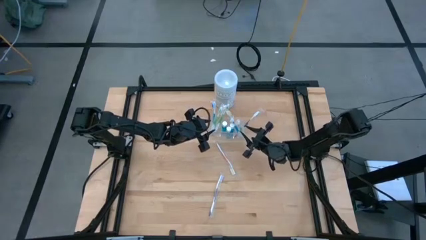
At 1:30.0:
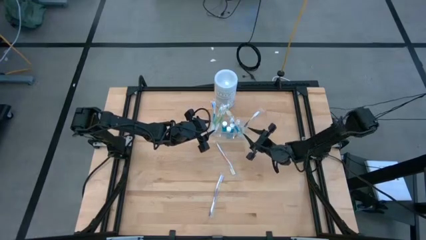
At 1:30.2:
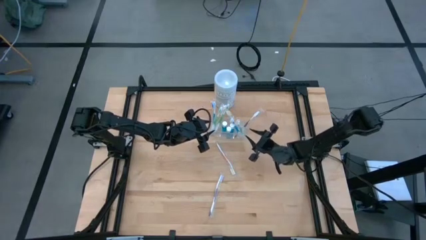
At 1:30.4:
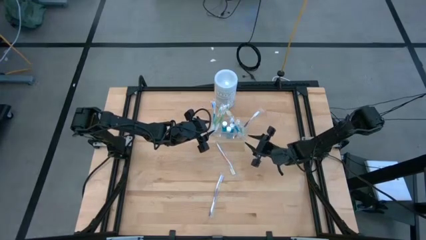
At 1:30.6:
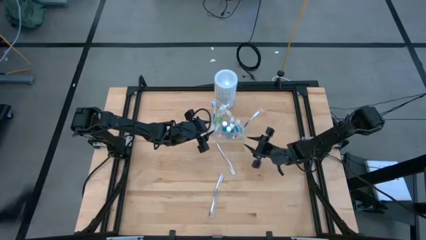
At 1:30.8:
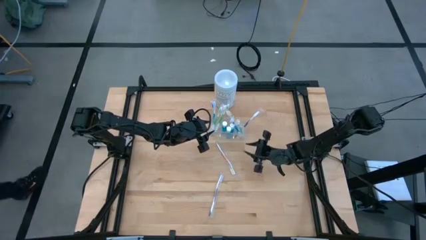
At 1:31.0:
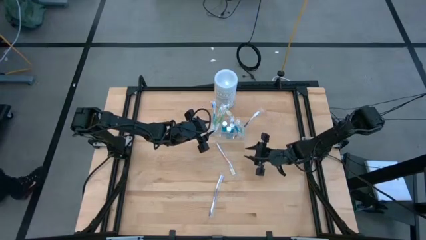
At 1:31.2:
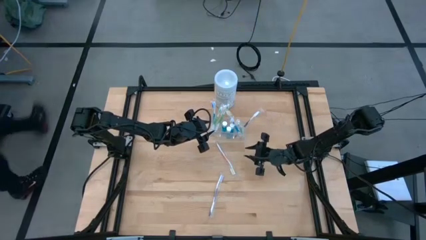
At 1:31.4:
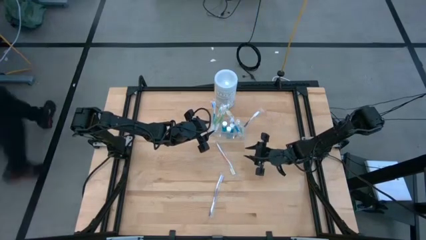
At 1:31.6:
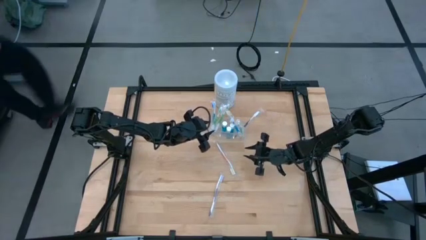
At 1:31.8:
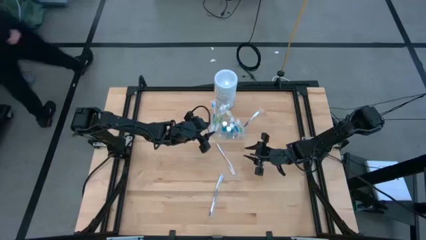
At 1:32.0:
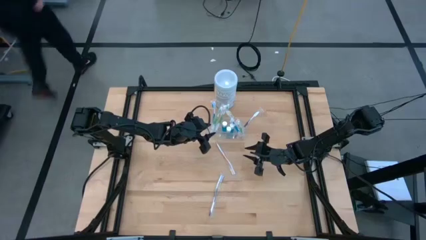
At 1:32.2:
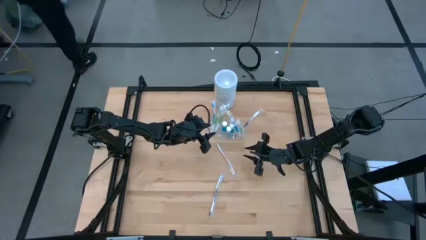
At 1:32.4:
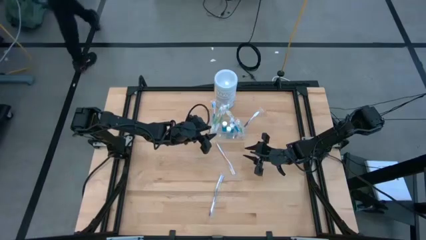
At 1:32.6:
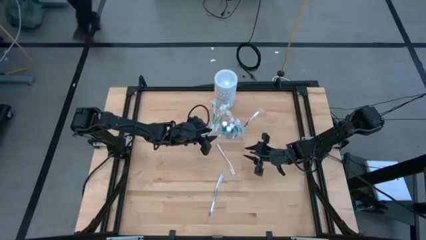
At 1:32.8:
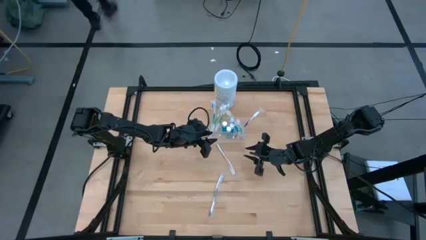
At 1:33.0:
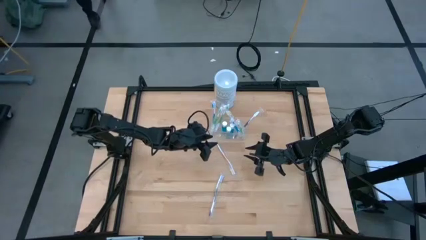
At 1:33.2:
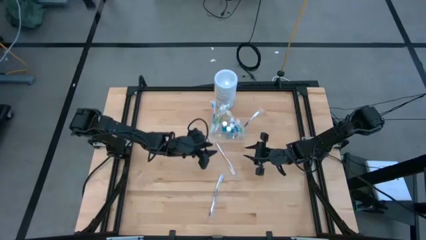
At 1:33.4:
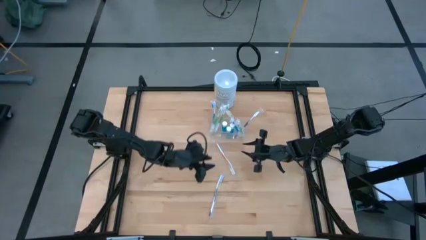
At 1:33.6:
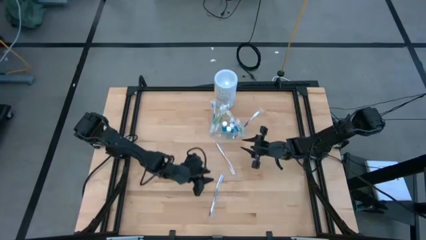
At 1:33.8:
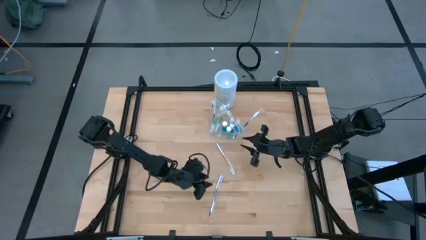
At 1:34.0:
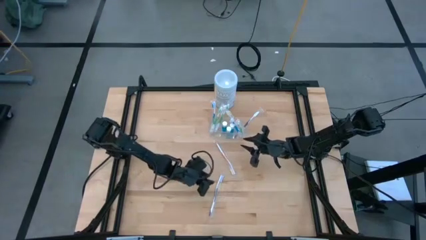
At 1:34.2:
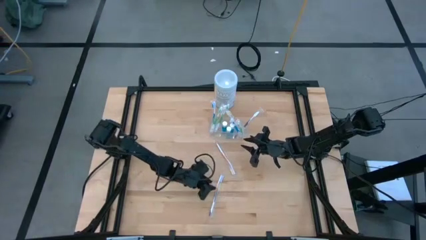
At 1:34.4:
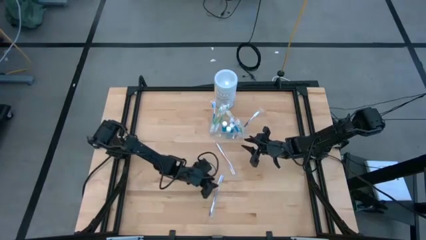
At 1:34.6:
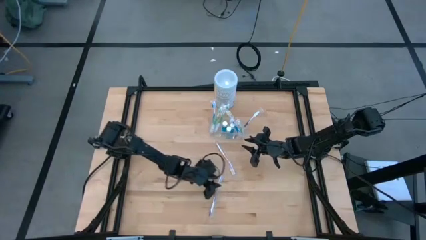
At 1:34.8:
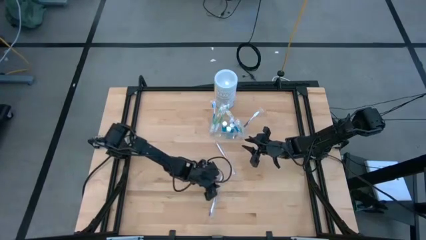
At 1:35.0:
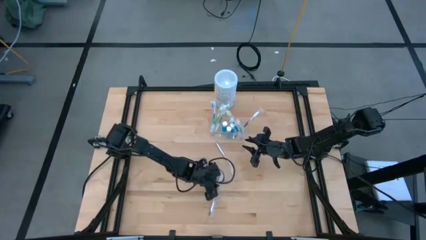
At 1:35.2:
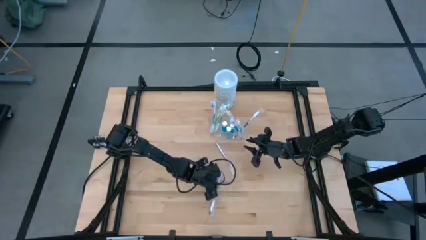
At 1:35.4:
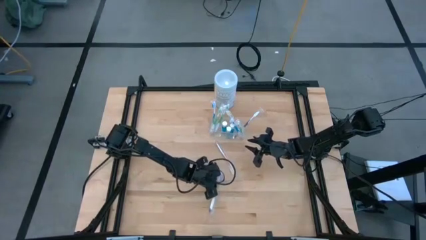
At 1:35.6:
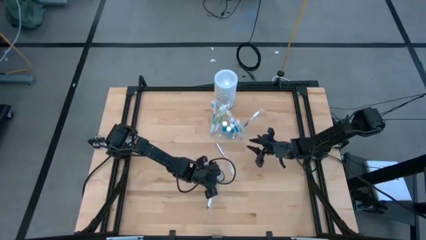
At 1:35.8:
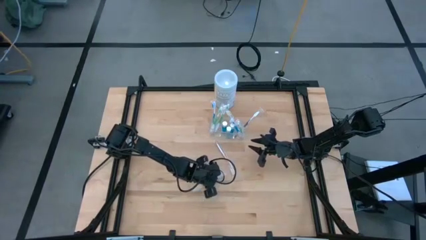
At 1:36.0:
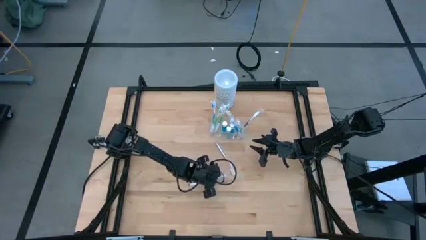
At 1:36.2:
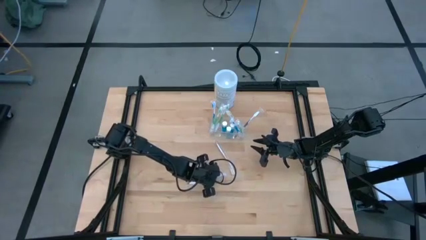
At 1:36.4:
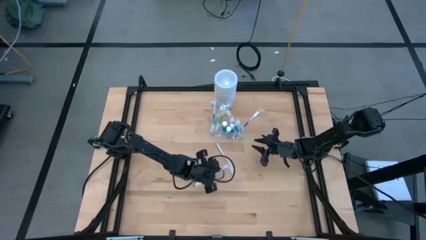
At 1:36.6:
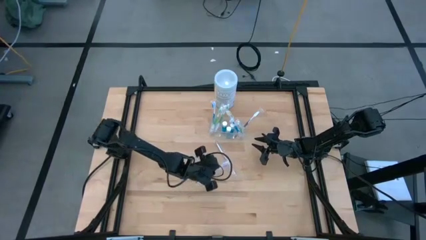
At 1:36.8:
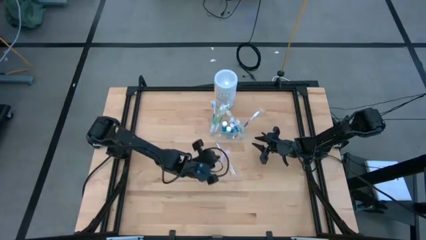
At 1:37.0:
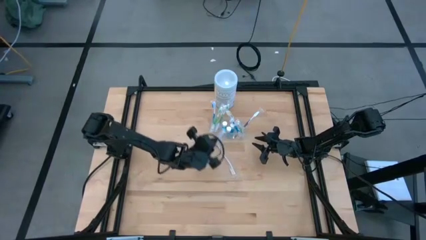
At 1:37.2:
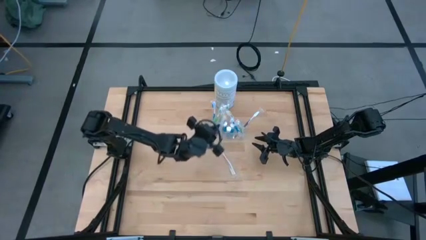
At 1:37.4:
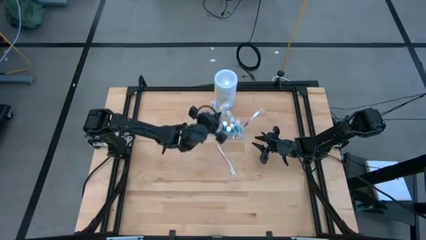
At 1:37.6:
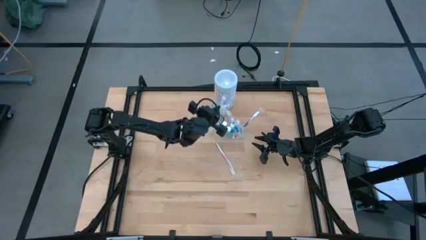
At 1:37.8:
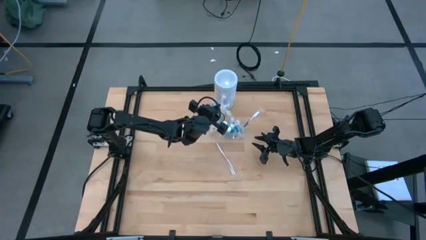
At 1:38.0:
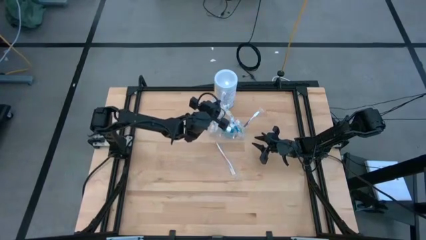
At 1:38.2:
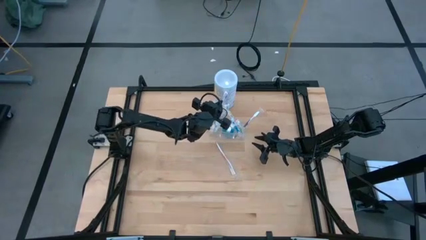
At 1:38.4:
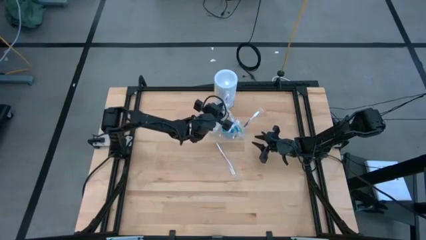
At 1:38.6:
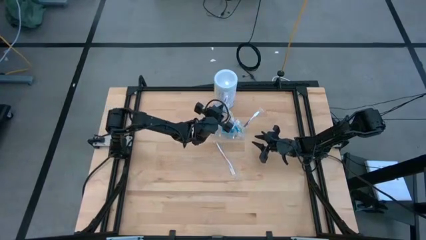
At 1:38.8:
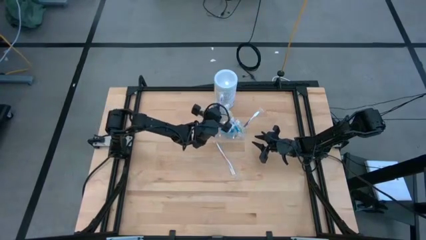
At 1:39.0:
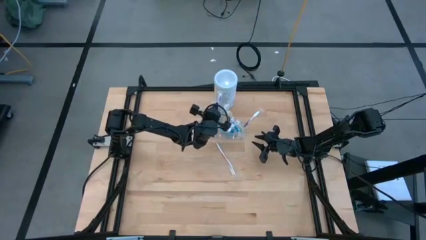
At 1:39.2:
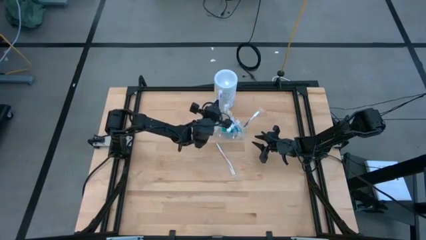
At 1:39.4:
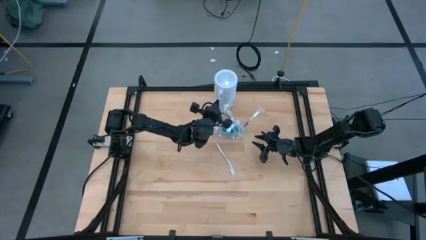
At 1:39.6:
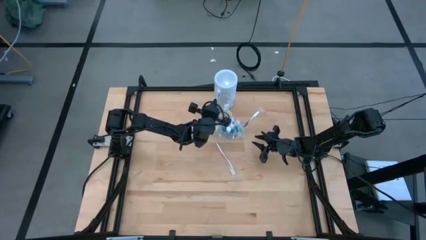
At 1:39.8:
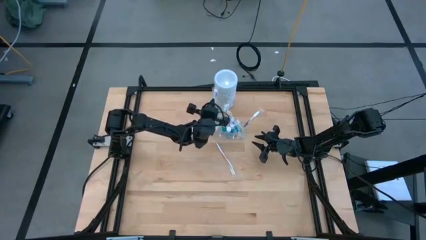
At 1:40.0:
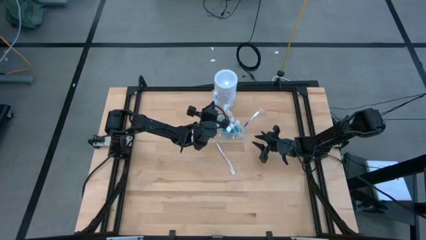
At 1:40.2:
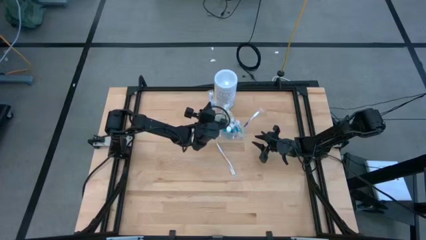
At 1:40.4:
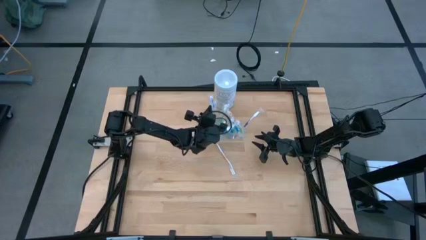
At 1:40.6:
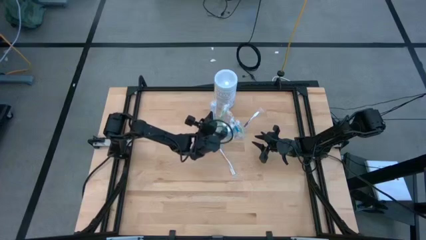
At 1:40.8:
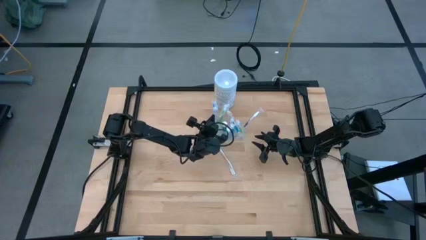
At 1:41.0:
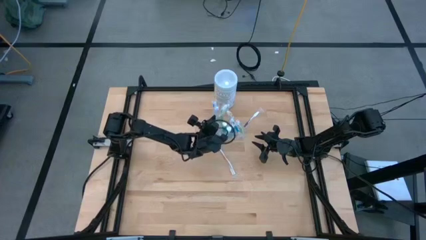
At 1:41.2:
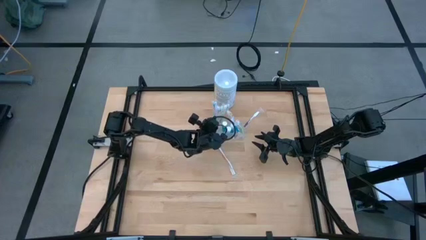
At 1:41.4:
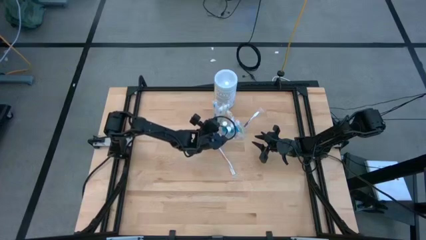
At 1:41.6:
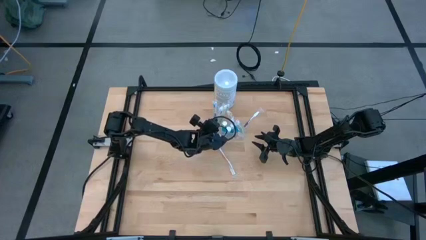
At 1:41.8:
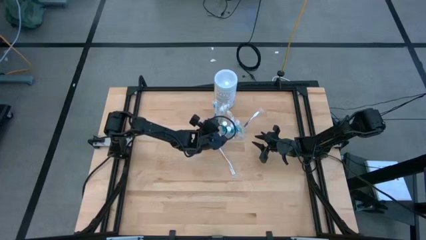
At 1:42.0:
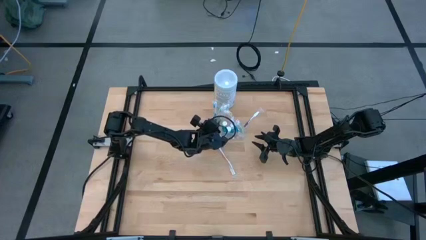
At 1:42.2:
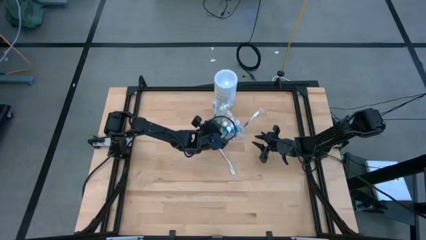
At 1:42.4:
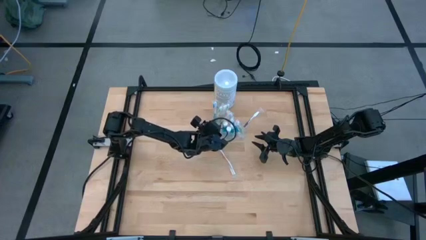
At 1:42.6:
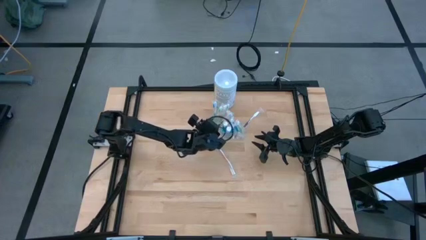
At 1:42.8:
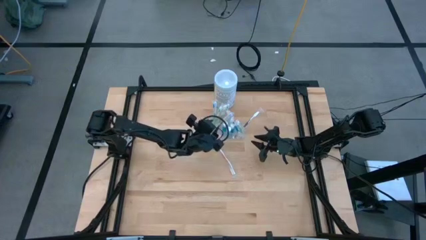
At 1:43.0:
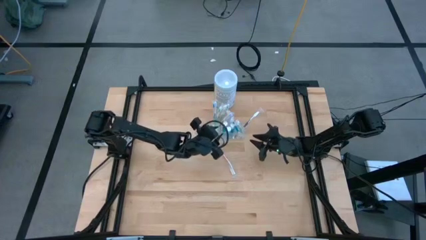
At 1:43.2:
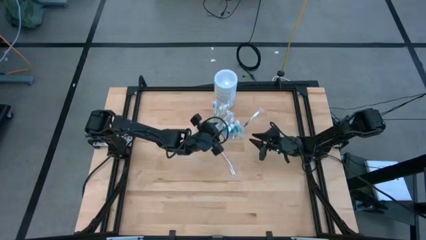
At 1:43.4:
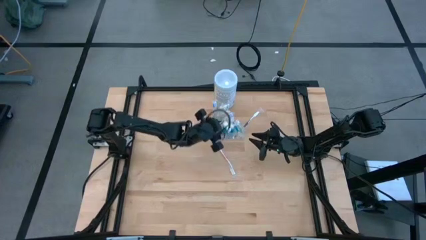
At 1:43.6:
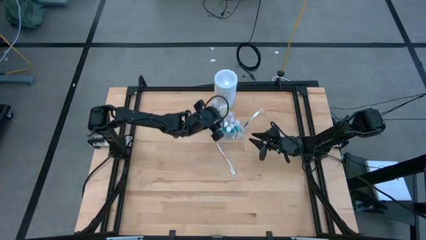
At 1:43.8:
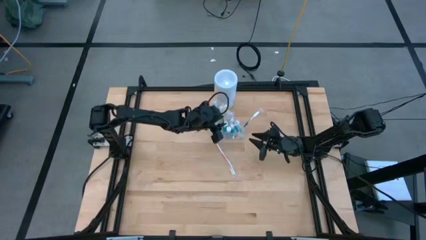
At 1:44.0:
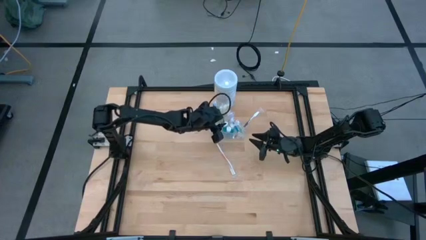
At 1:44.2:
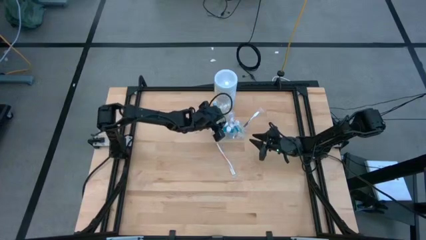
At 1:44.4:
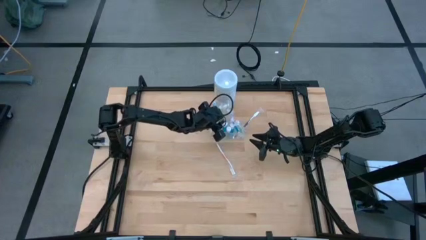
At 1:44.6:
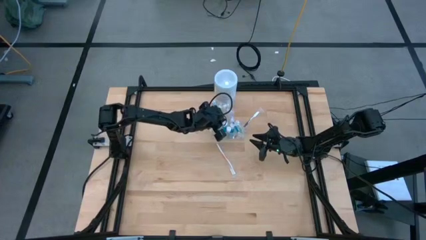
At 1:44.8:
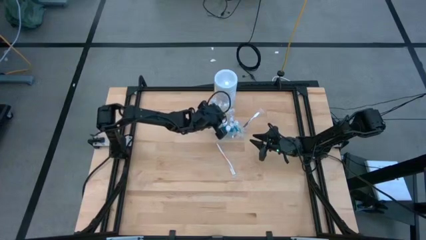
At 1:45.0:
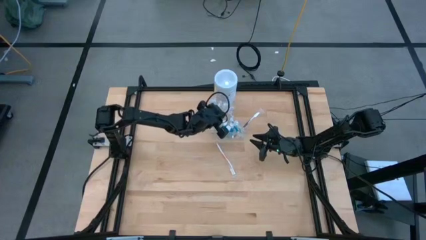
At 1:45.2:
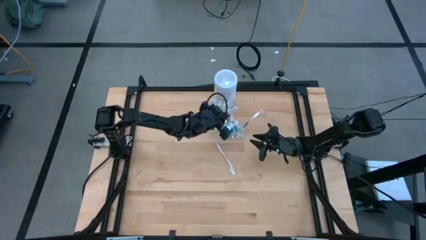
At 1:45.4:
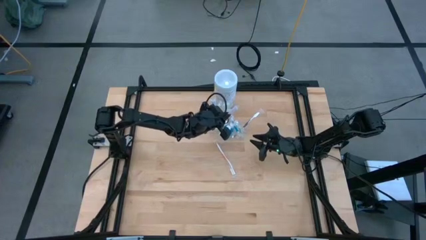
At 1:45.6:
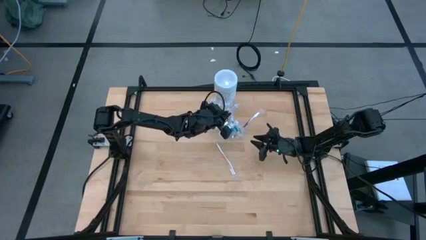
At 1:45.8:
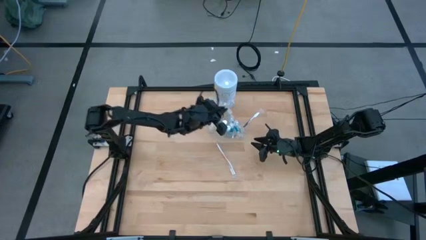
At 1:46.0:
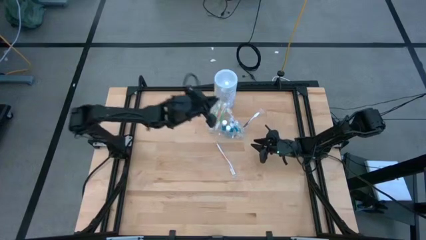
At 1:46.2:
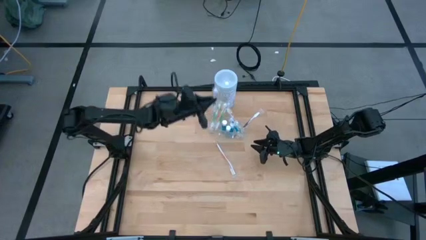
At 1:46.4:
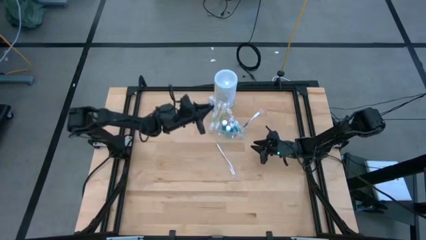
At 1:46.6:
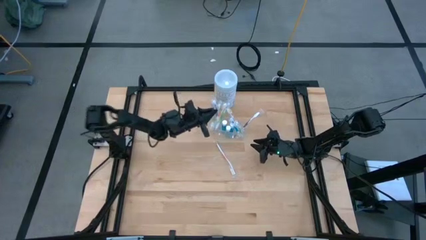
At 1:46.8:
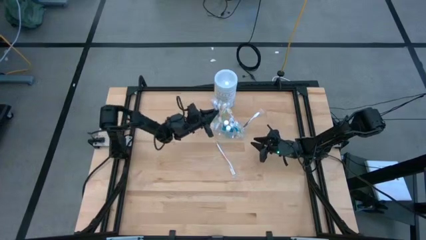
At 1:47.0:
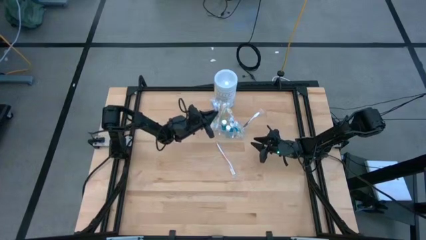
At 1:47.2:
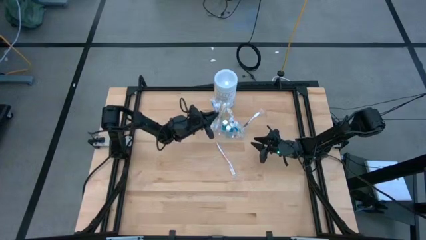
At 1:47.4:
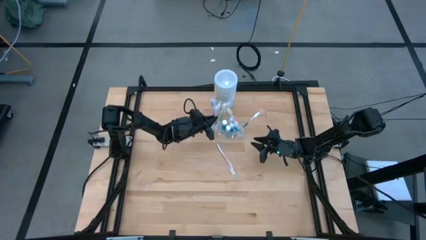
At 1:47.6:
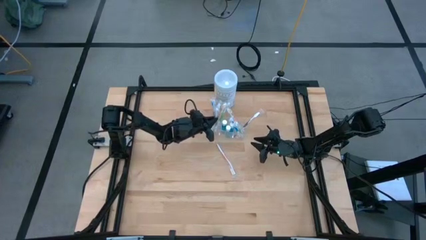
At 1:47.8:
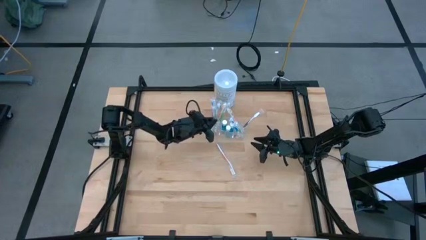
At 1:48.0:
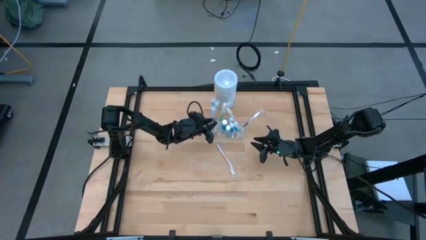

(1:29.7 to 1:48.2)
Task: Pick & Place toothbrushing station
Put the purple toothbrush into the transparent organizer
